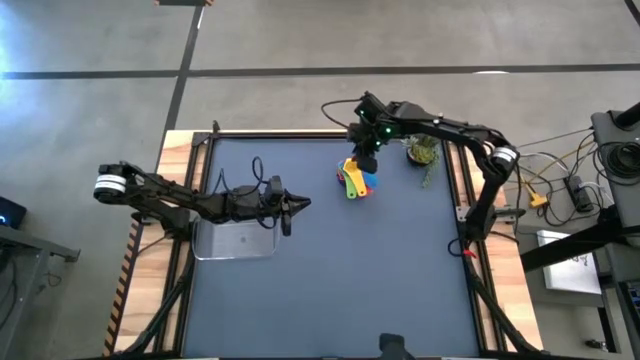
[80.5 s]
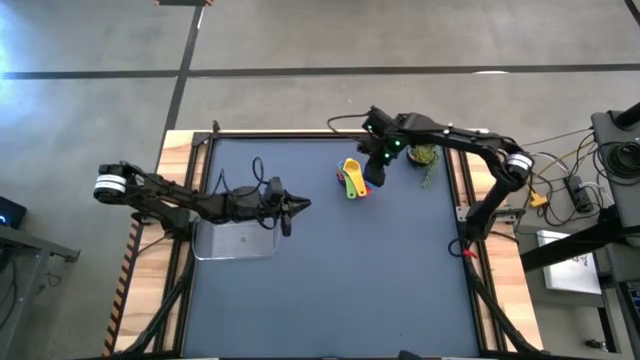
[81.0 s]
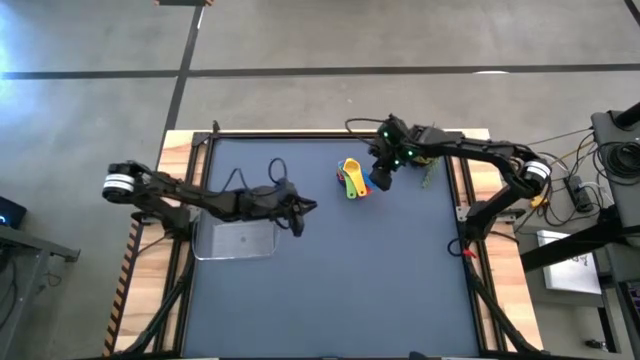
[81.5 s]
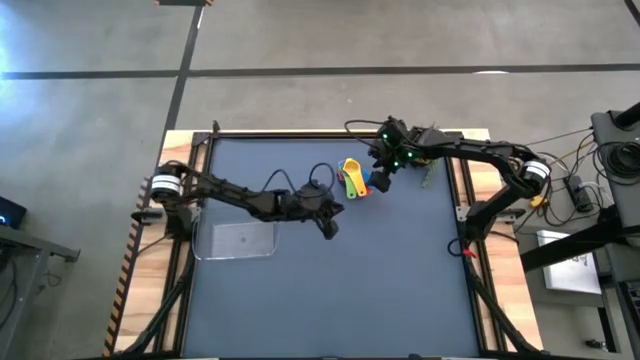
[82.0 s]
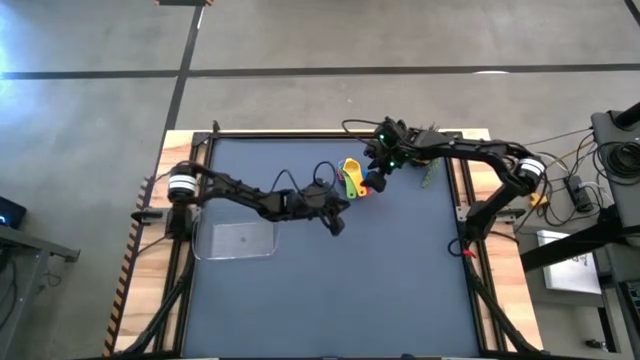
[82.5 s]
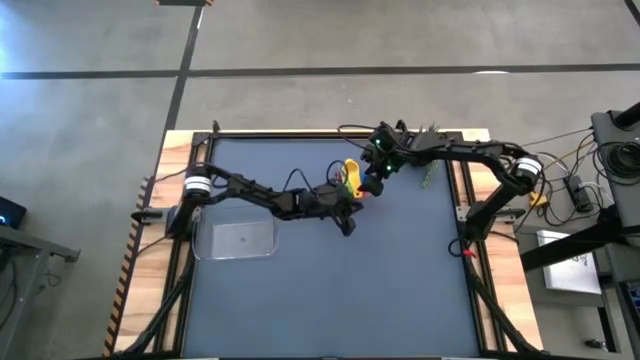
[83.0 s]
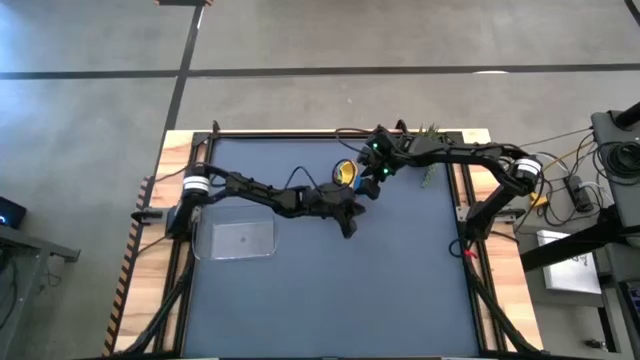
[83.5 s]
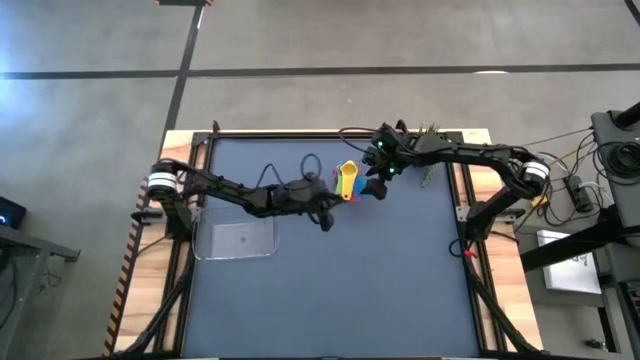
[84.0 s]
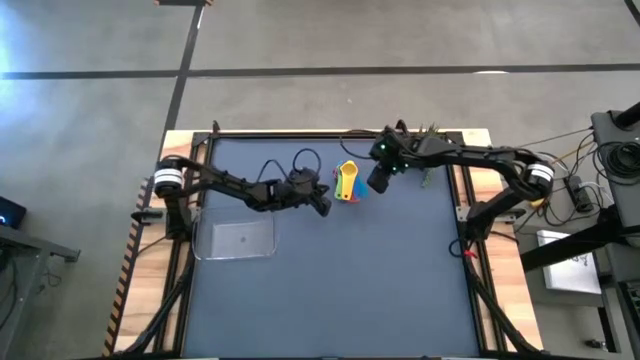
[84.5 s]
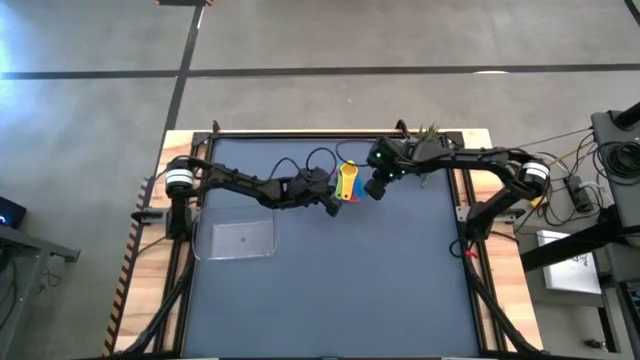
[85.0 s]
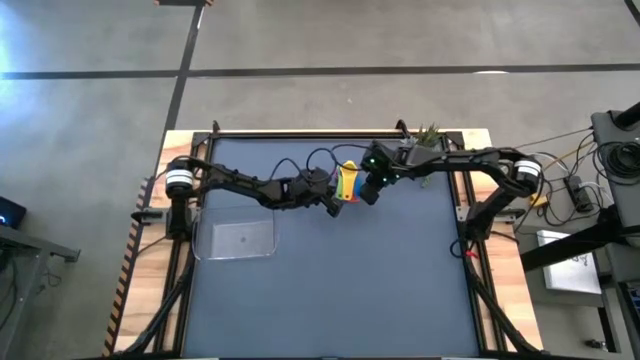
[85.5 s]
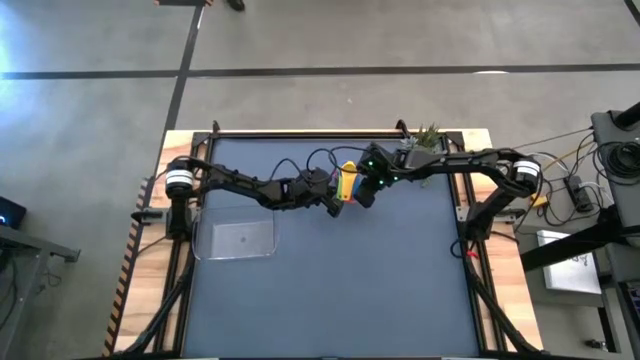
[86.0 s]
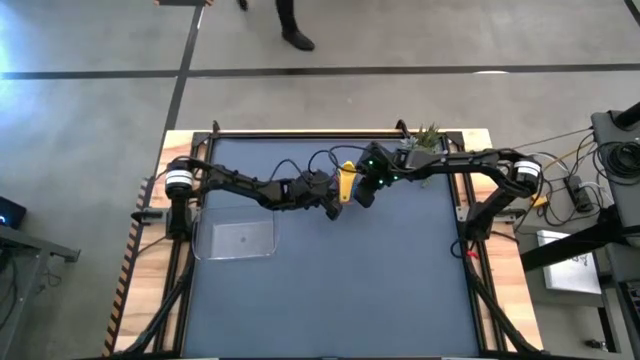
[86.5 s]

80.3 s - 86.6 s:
Task: Nest measuring cups in basket
Adjust the stacked measuring cups on the table

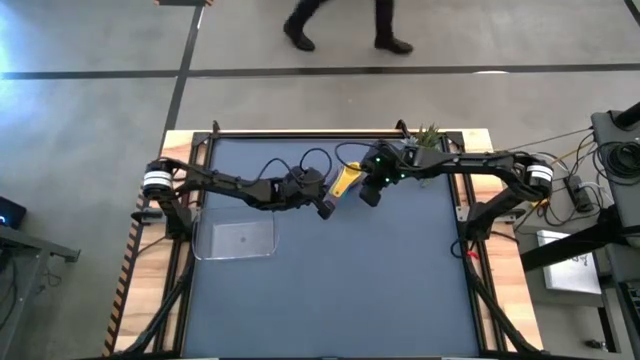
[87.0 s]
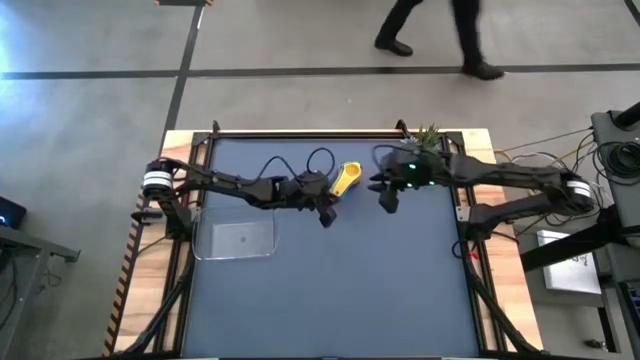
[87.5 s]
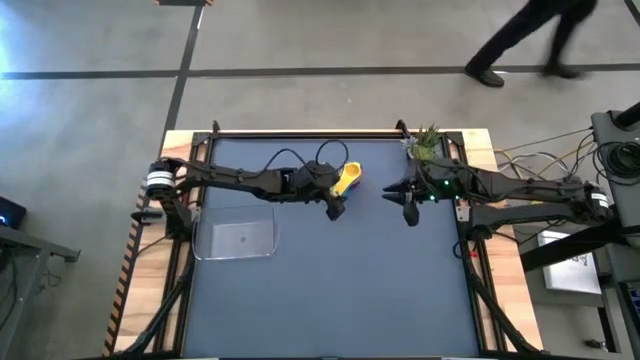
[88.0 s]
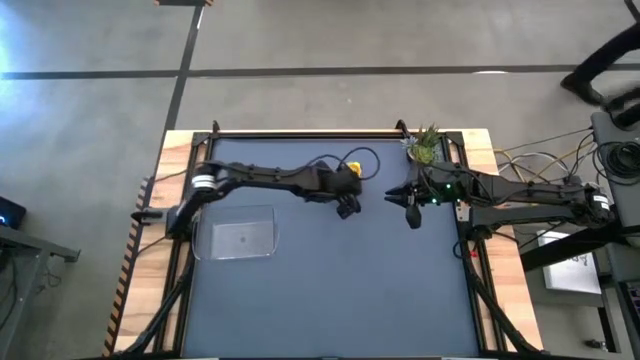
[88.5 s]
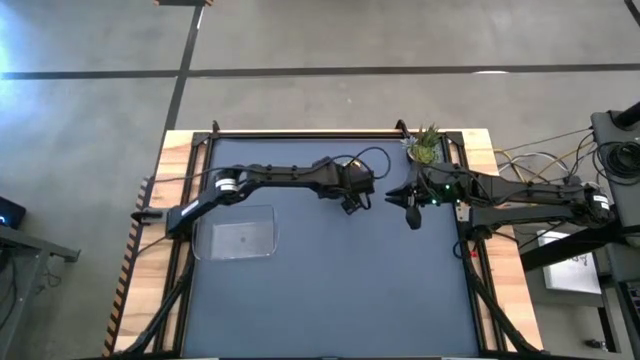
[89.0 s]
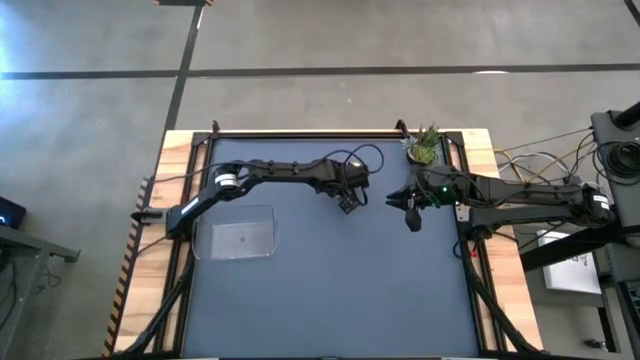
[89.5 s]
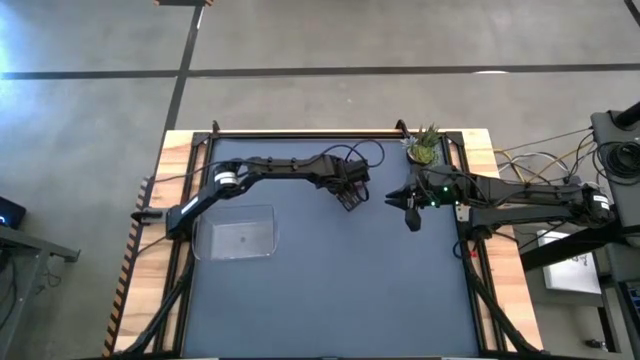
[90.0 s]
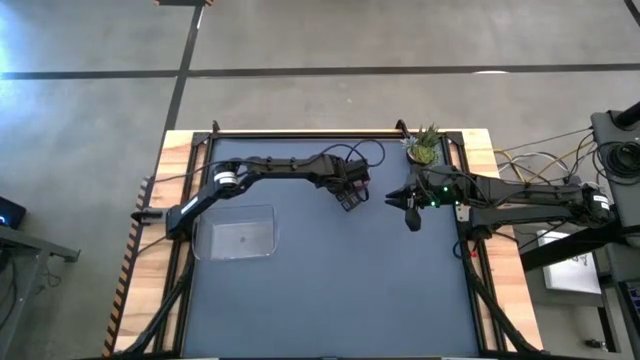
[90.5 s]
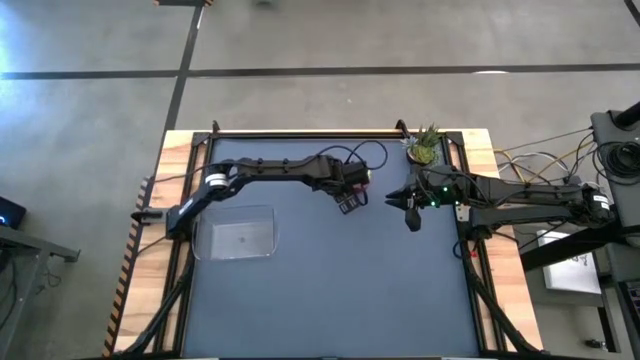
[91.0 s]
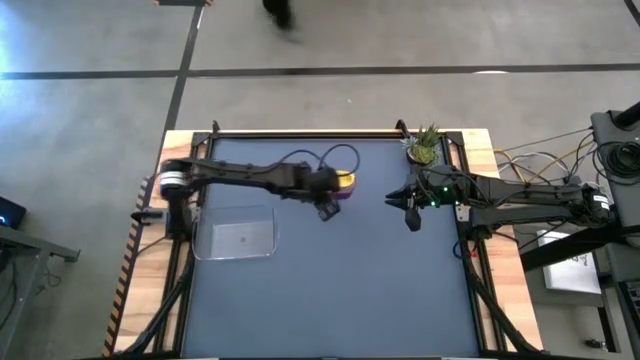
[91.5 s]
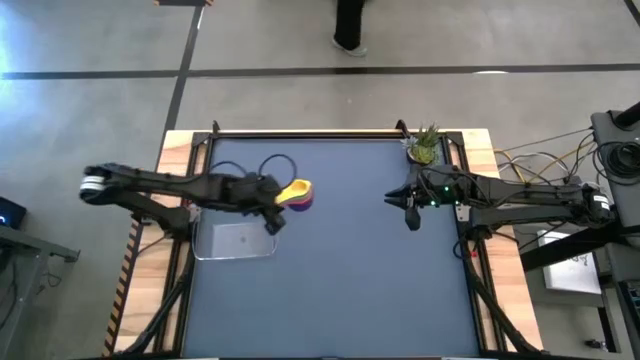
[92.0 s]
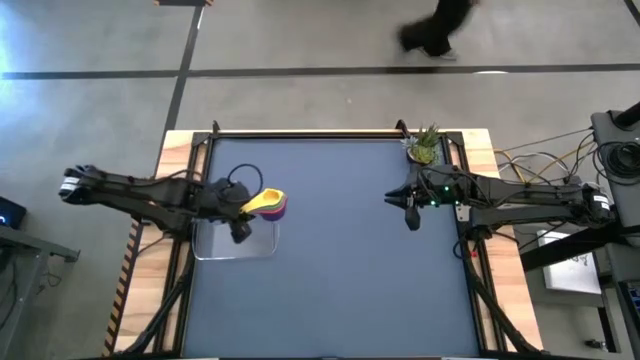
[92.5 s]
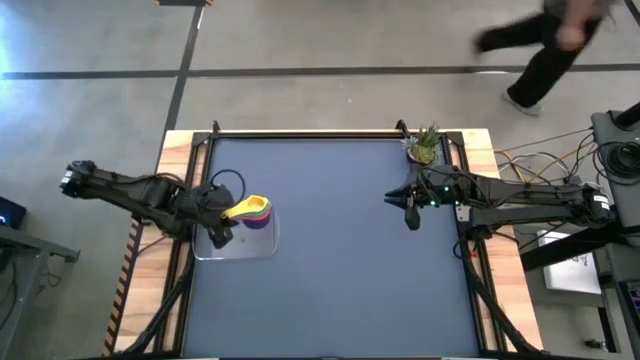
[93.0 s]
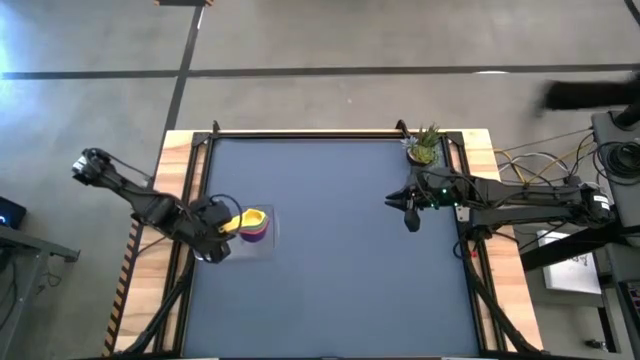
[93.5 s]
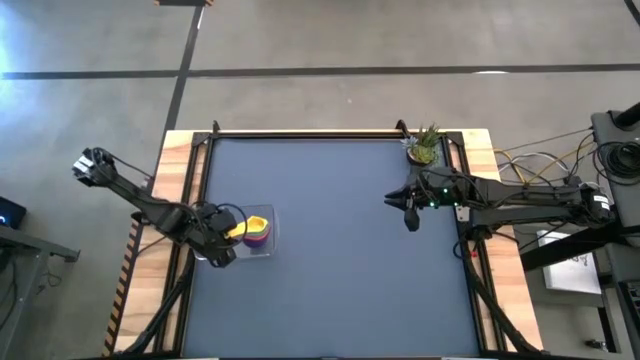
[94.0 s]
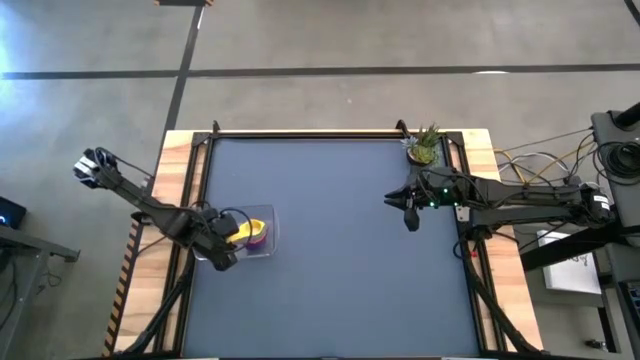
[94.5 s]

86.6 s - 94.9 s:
Put the stacked measuring cups into the transparent bin

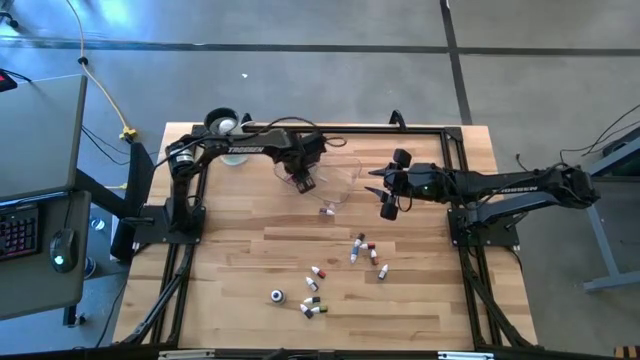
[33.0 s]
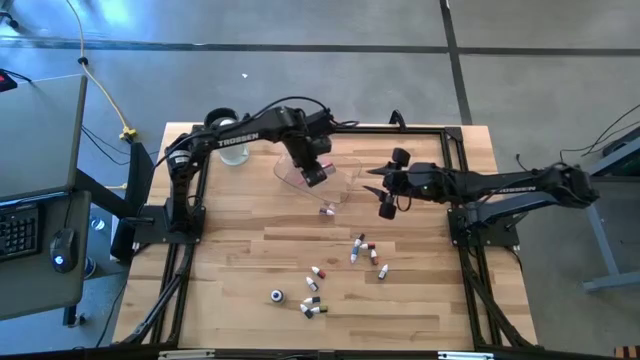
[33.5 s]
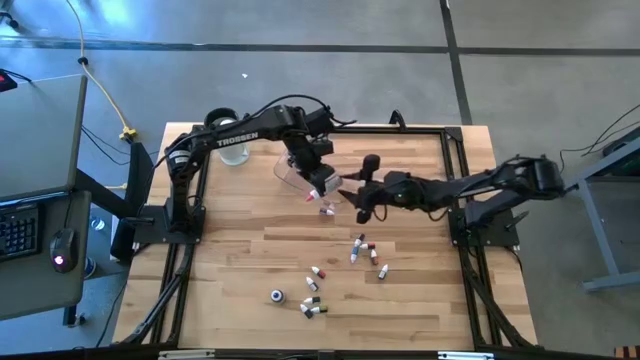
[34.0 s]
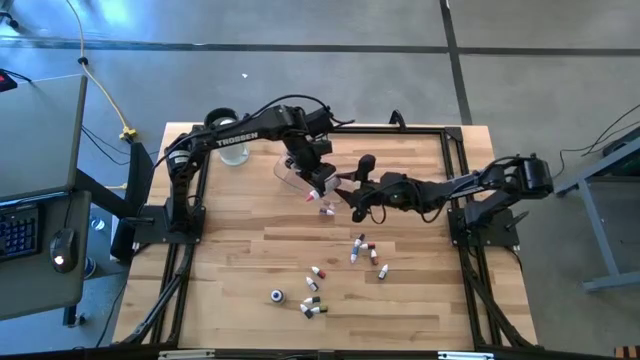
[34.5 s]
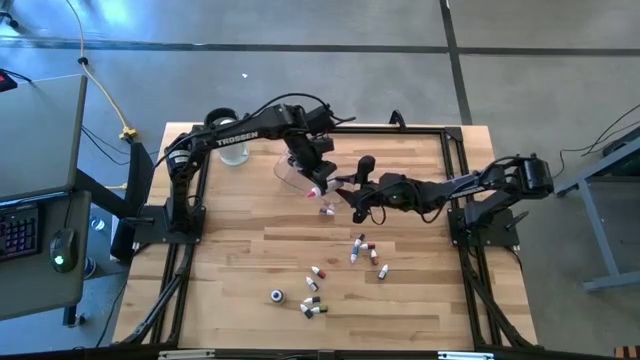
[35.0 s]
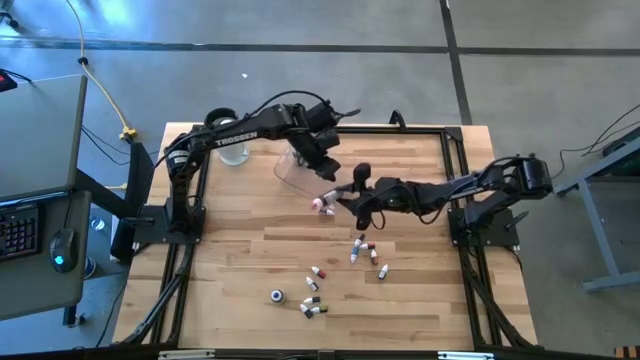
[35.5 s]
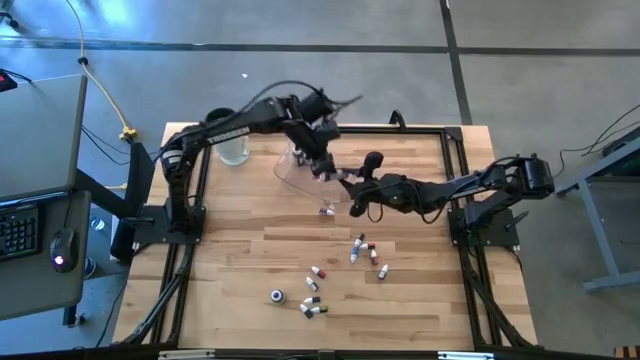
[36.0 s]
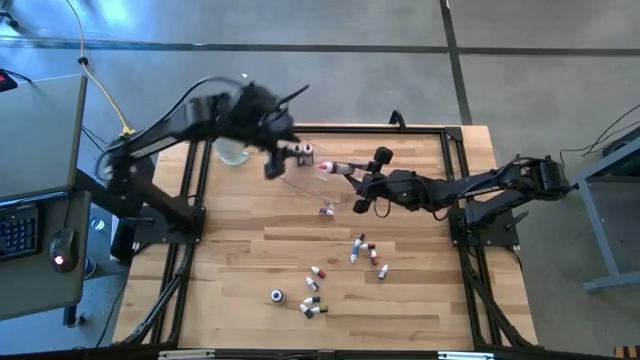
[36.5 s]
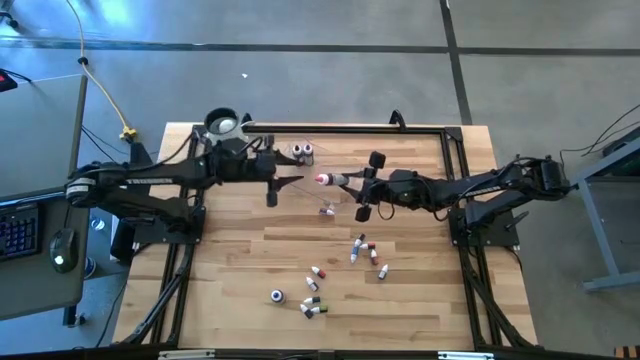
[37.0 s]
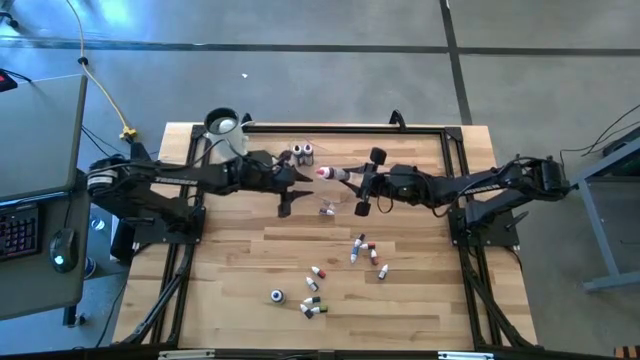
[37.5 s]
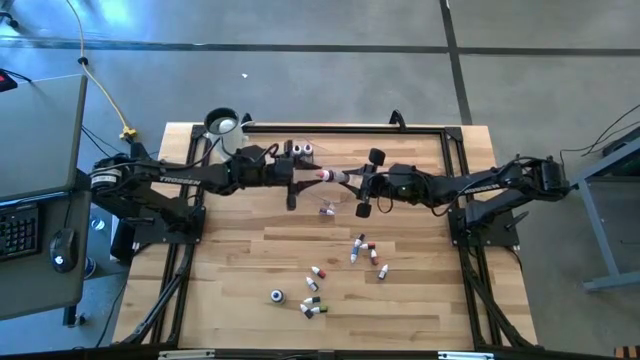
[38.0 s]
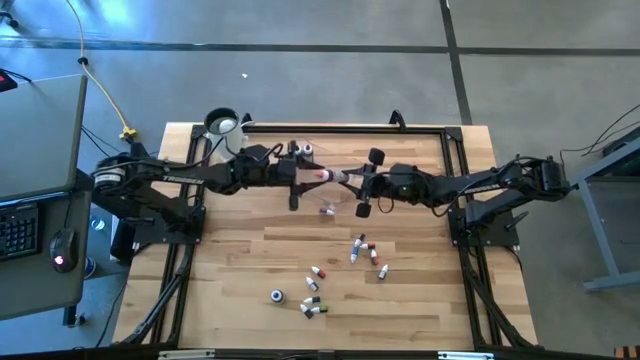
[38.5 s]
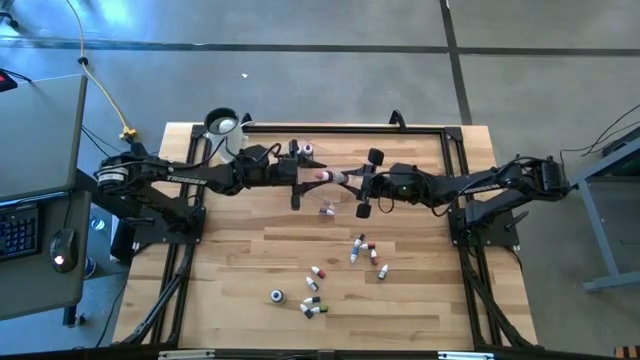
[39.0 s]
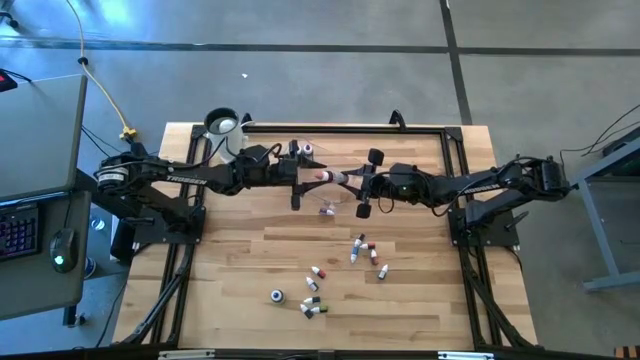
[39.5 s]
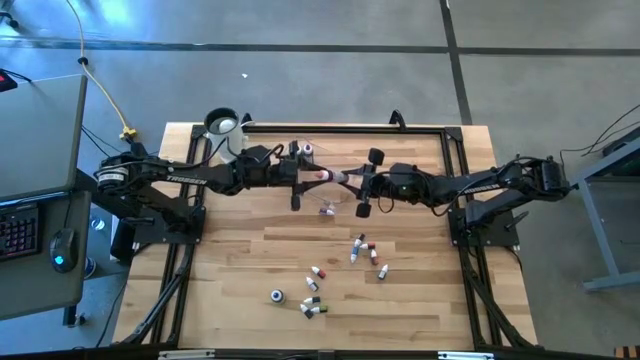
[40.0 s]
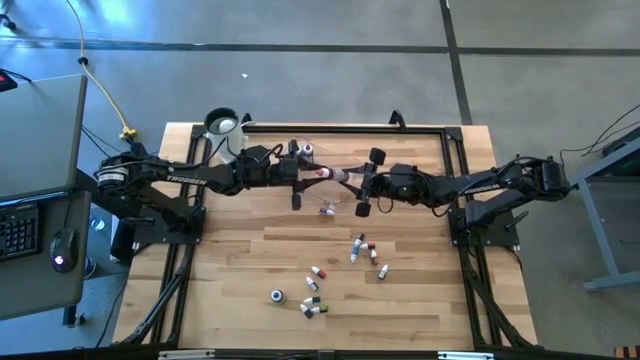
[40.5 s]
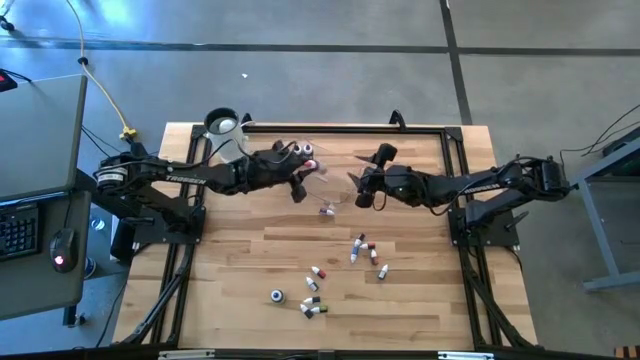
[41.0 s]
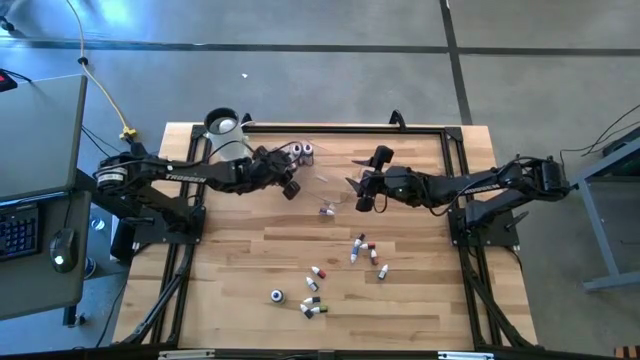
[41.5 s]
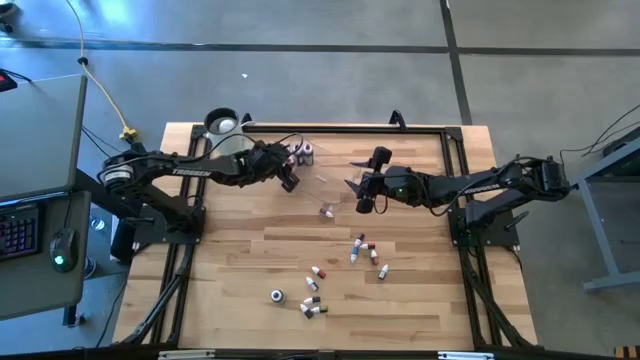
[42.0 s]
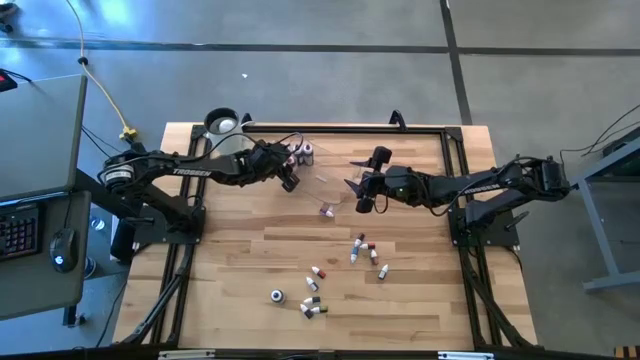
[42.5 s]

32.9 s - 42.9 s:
Task: Pick & Place food coloring
Put the large pink food coloring bottle into the bin
